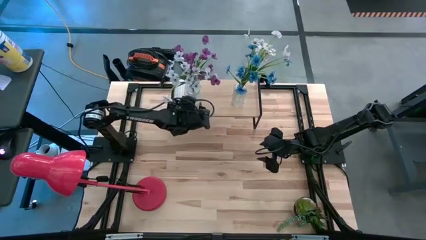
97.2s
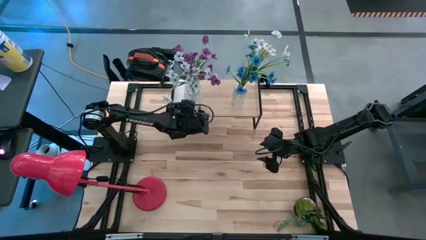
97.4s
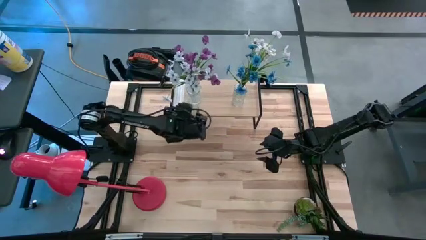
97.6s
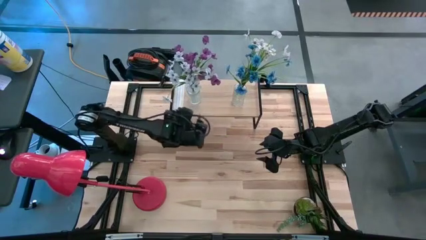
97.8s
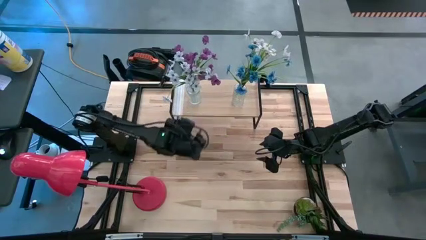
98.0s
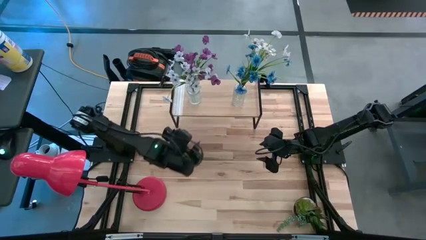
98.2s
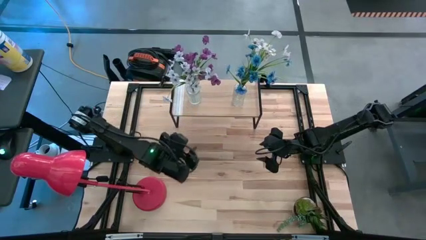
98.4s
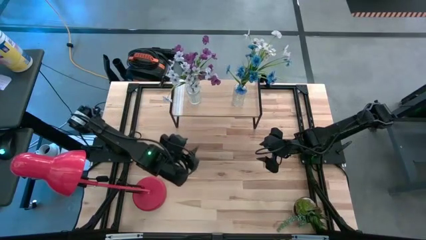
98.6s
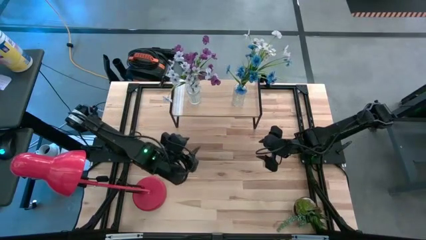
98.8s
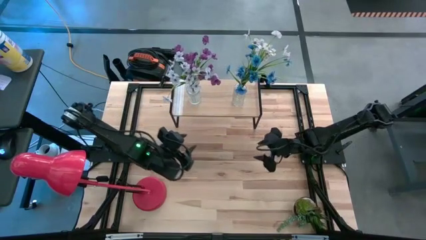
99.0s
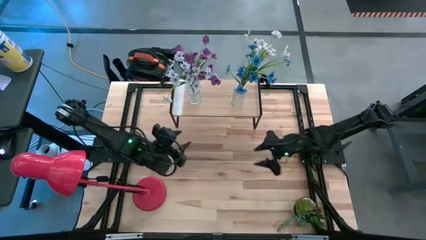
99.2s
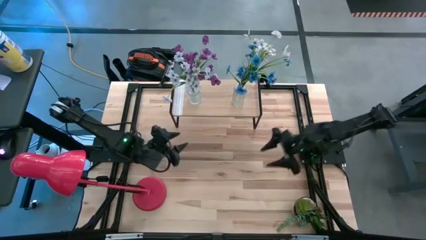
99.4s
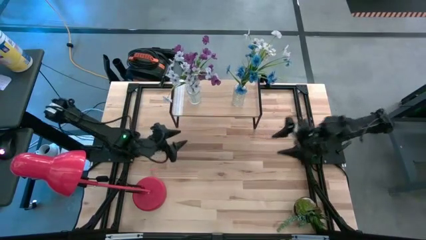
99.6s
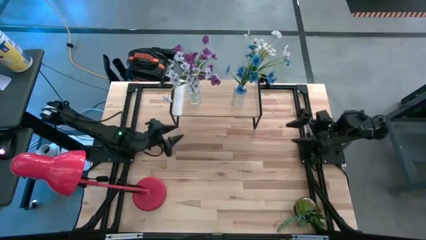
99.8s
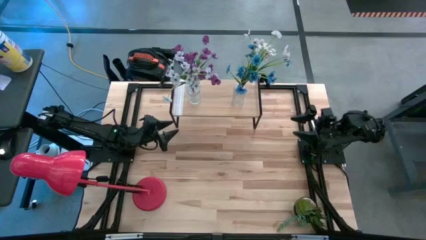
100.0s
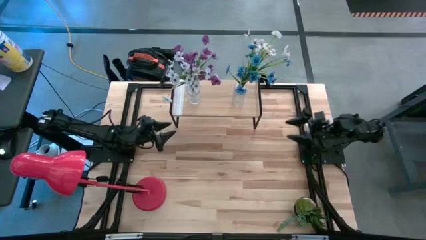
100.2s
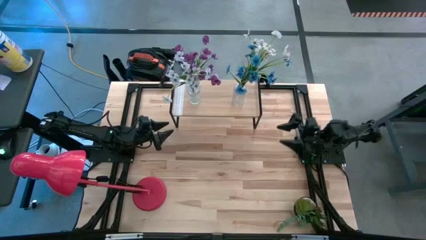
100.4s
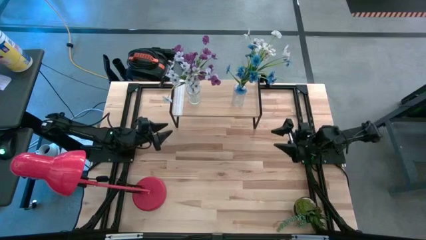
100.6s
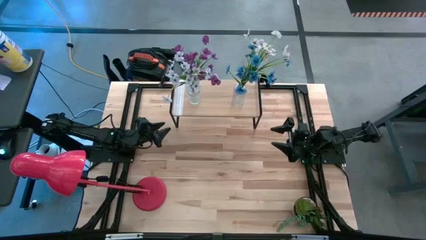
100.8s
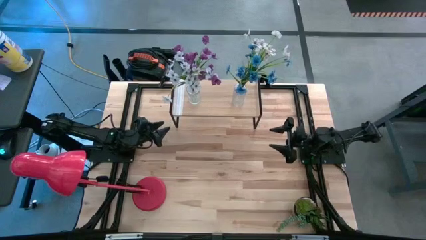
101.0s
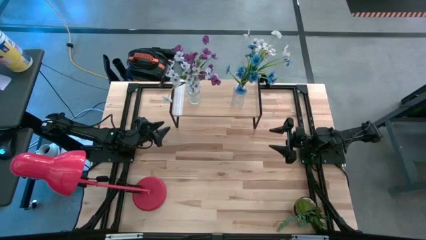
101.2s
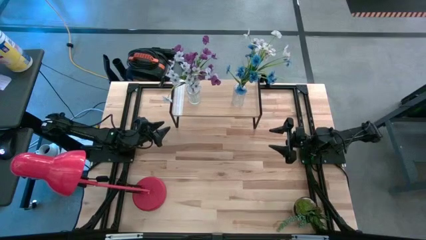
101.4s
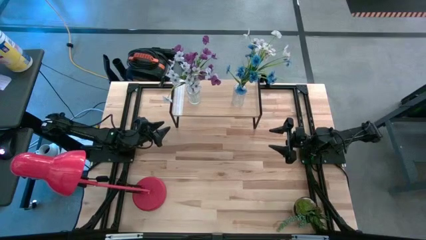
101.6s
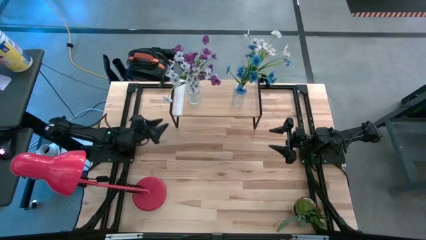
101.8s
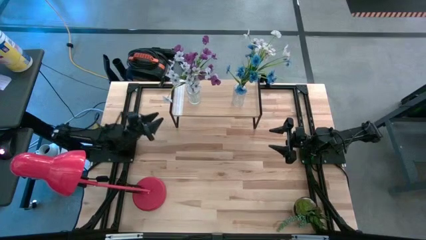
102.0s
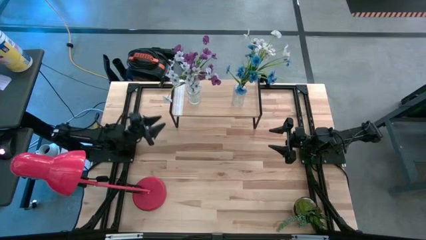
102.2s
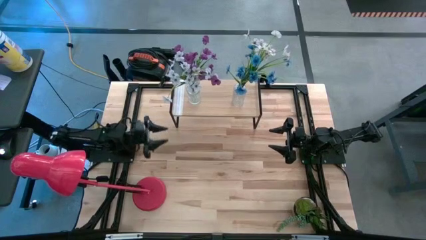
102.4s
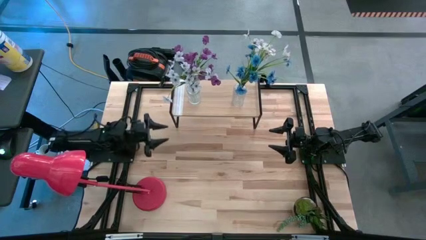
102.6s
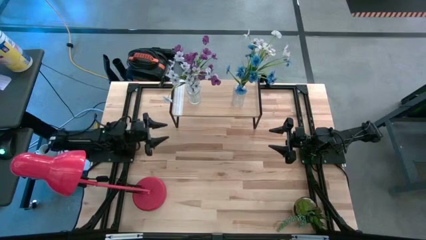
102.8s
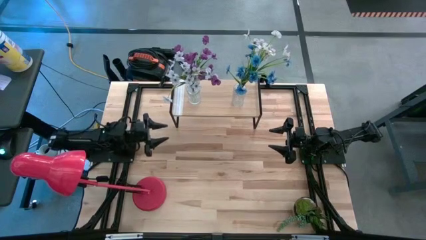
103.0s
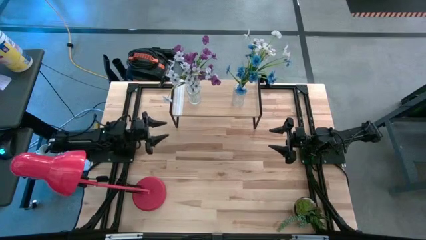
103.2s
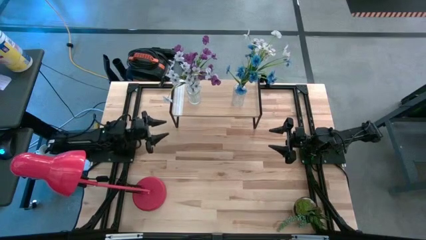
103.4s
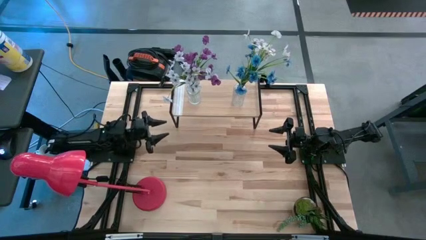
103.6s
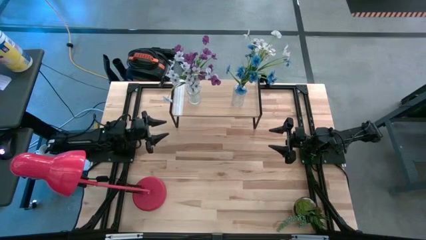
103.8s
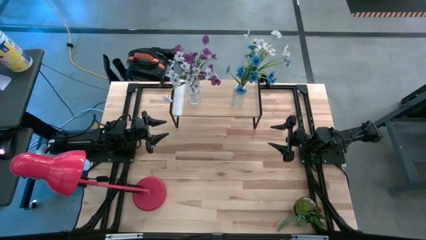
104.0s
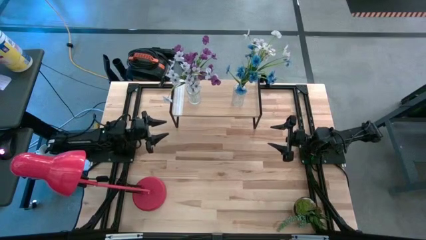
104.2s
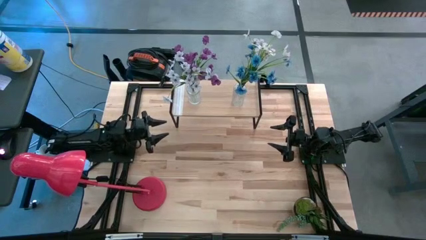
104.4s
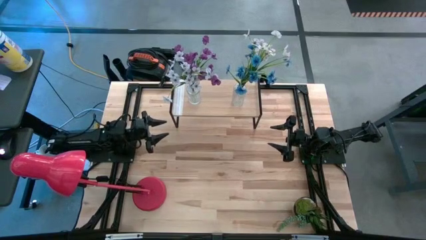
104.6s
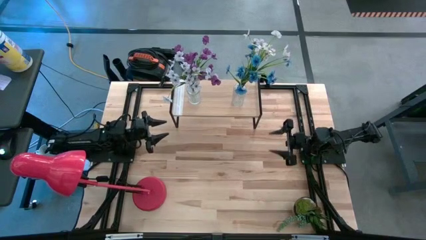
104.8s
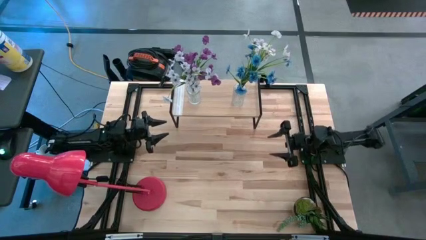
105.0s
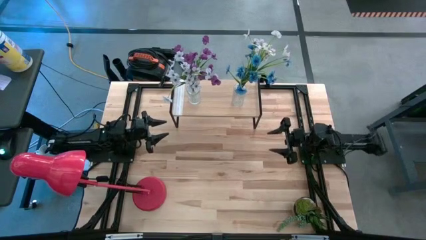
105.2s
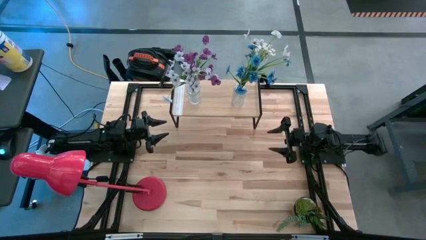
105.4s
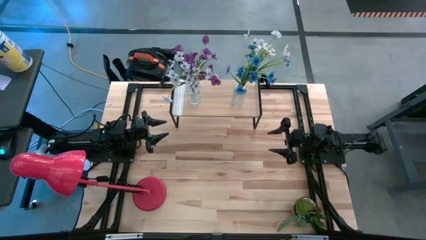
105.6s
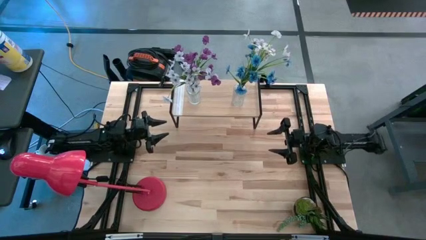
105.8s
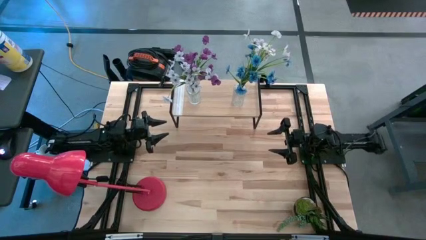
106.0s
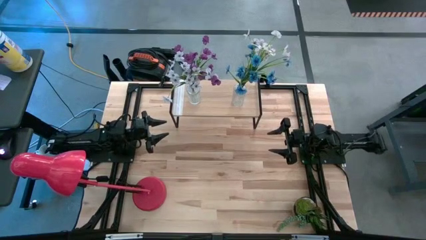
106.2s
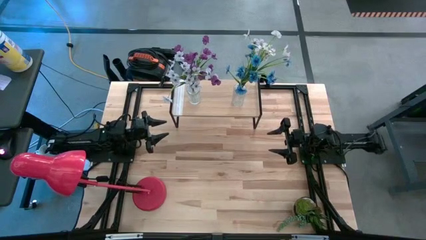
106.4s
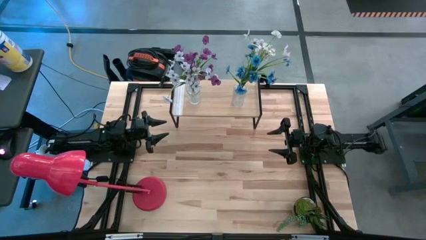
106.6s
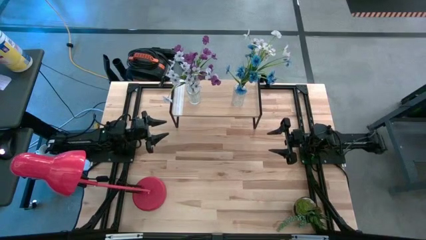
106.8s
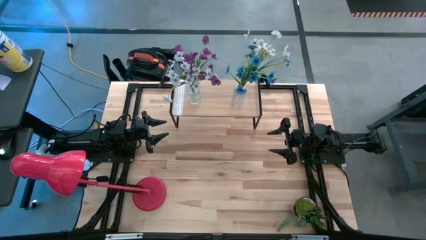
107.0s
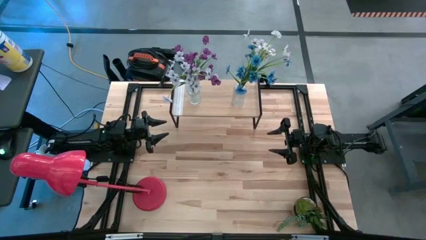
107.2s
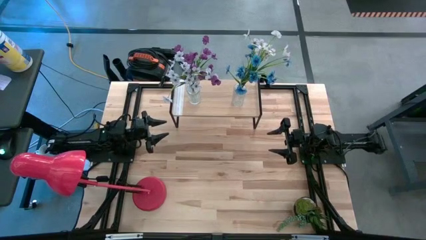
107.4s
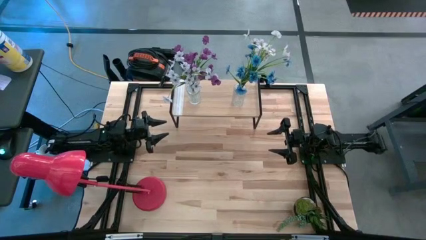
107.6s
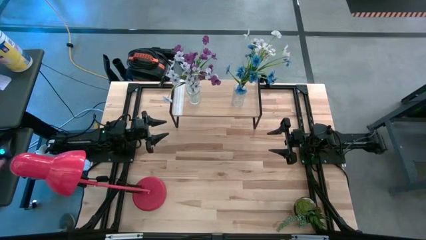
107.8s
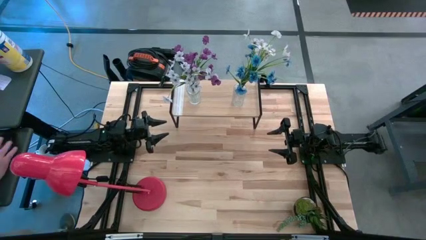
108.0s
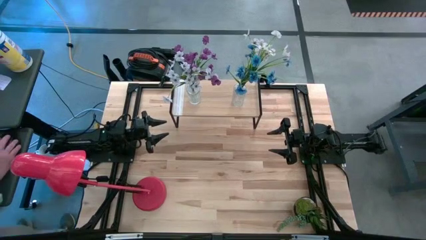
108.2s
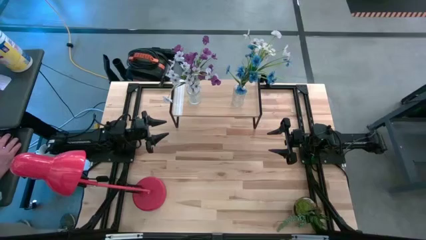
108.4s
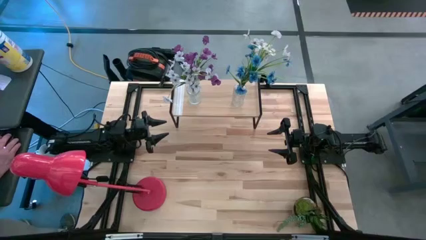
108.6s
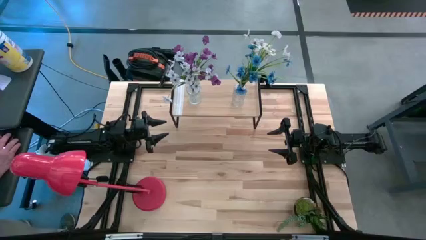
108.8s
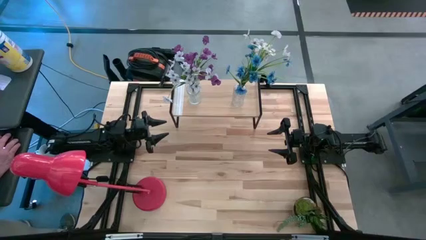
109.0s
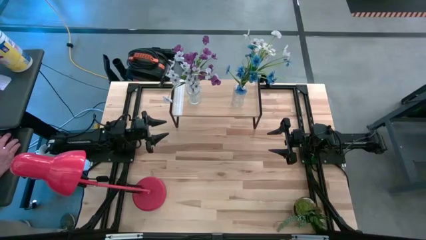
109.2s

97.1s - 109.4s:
Task: Pick and place flowers into a vace then onto a shelf
Return to Home Position

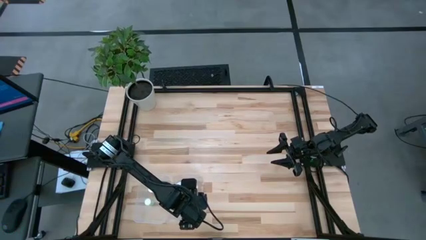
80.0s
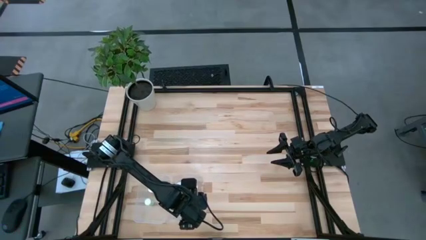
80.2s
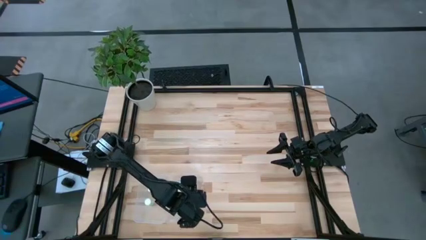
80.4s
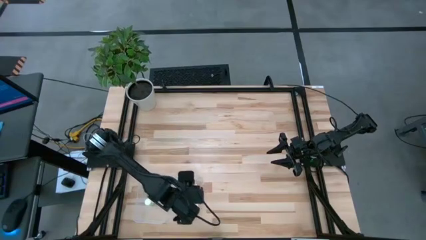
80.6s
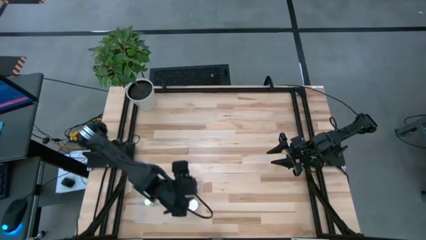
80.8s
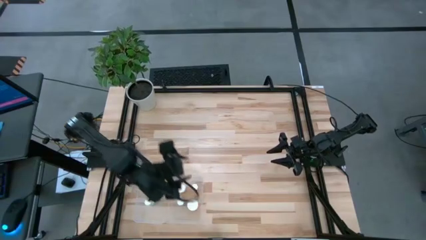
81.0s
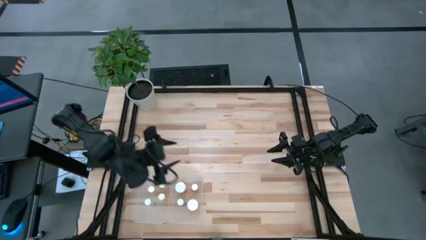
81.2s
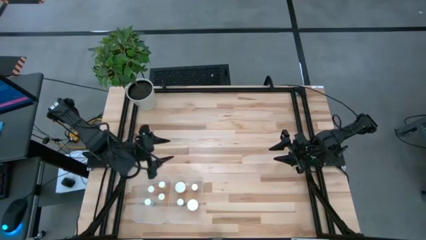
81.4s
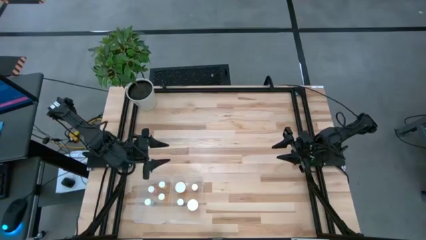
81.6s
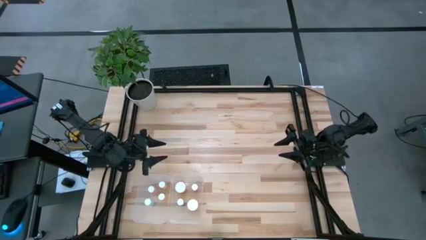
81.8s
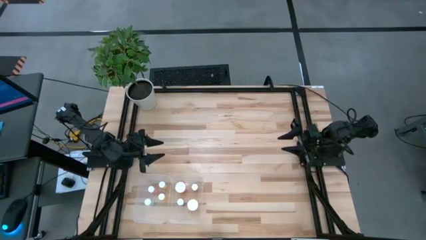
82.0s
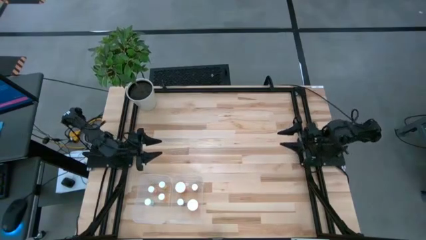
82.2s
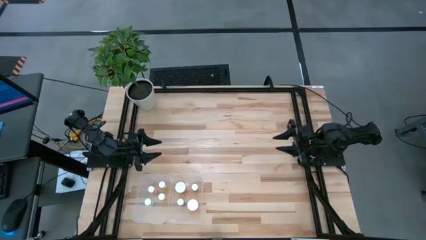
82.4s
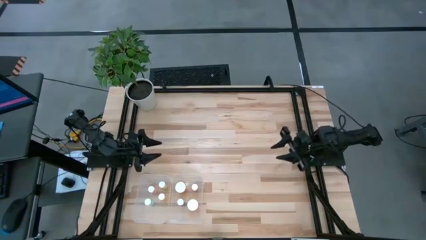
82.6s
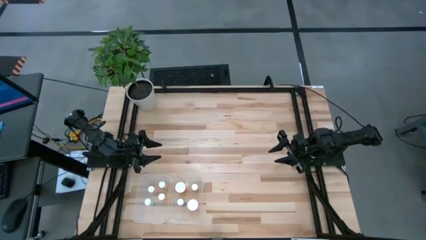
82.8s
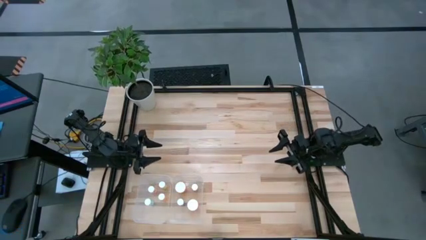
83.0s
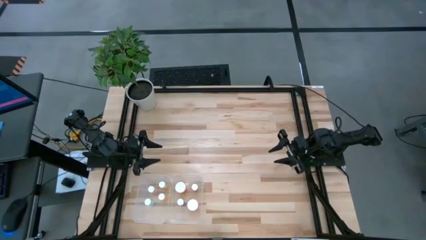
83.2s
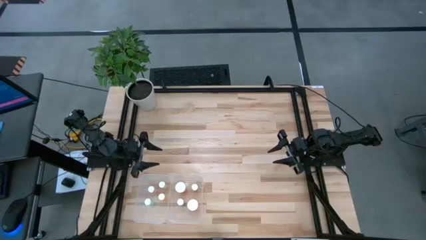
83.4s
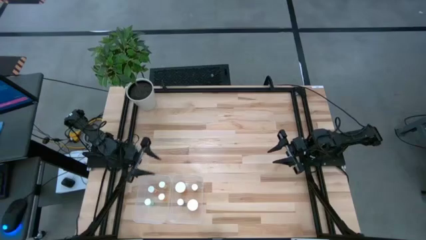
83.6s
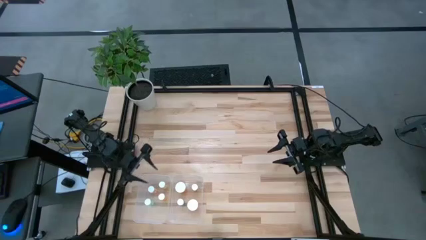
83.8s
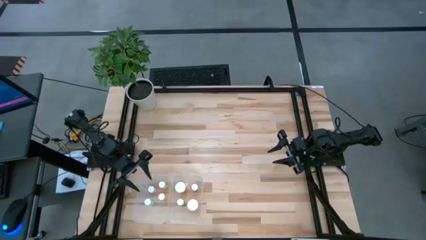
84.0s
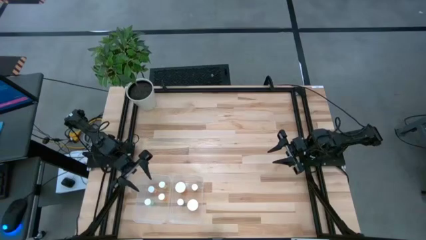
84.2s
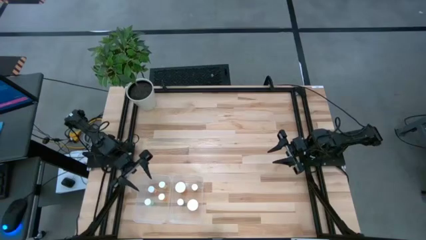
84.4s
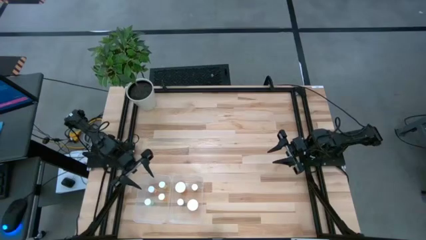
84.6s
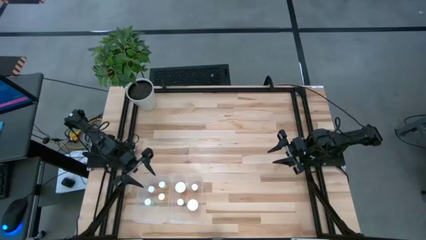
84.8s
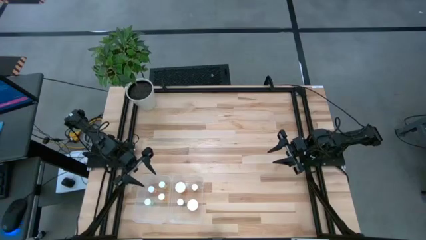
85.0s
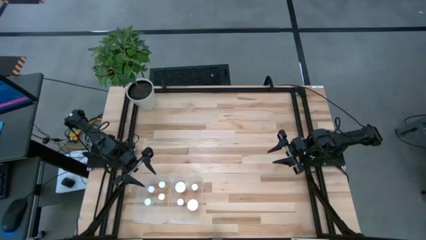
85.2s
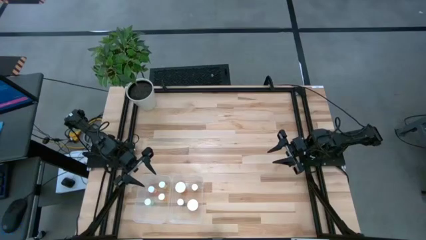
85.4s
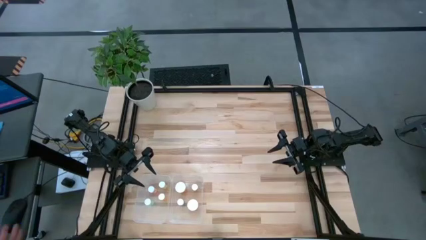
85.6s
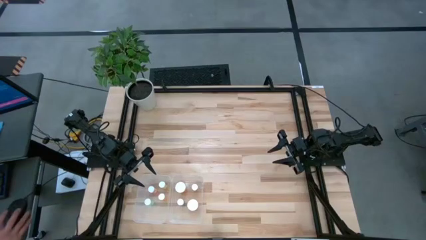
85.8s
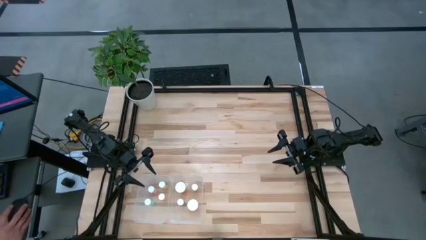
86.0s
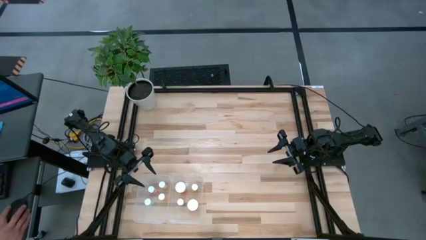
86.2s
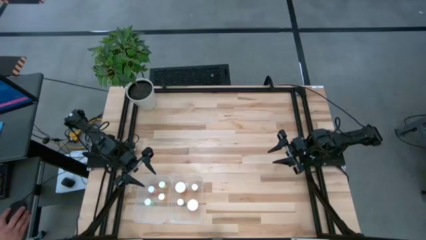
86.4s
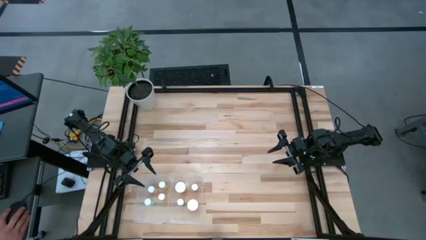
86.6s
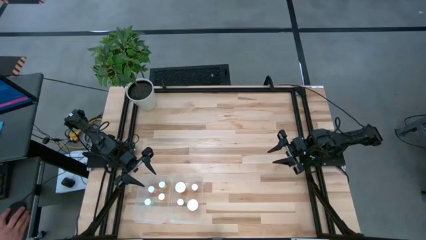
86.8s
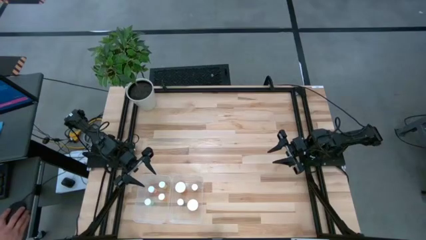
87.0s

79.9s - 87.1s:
Task: Pick and place medicine bottles into bin by pill shape (circle, oval)
Return to Home Position
